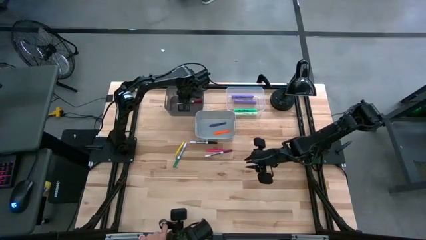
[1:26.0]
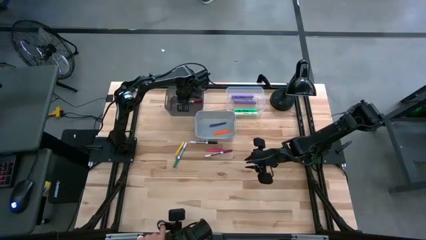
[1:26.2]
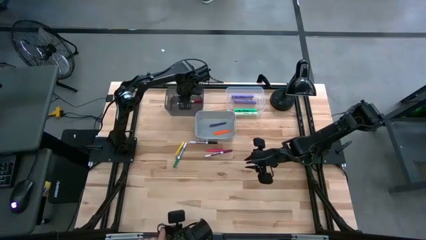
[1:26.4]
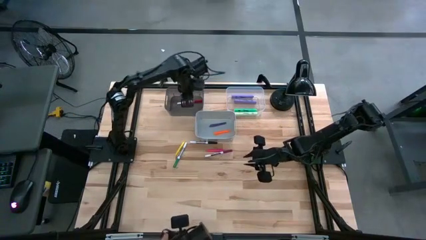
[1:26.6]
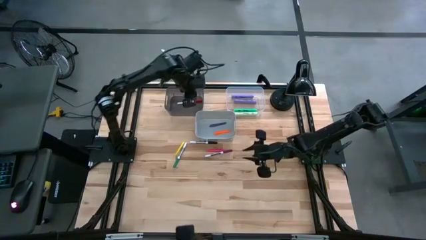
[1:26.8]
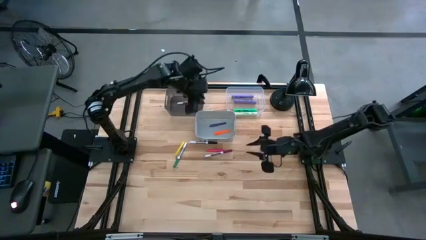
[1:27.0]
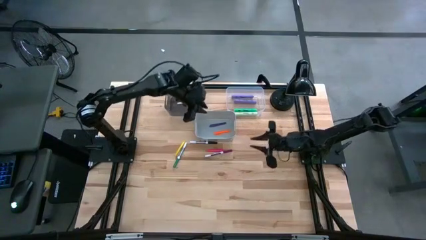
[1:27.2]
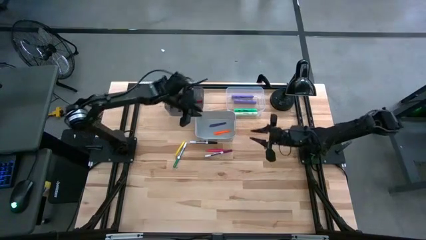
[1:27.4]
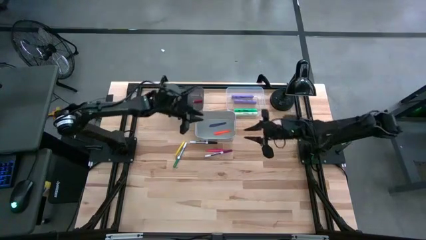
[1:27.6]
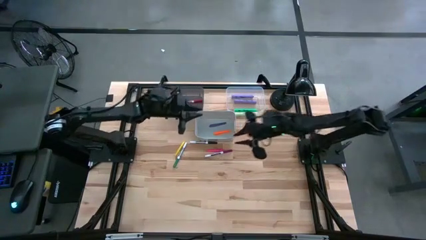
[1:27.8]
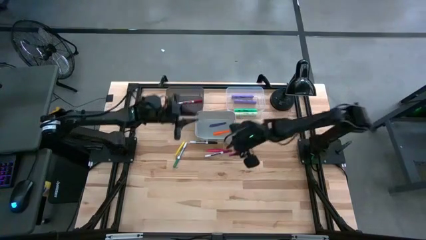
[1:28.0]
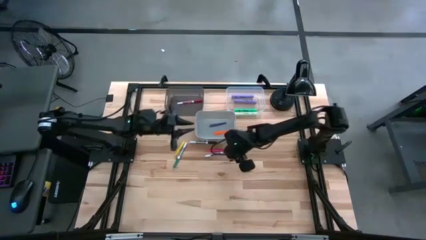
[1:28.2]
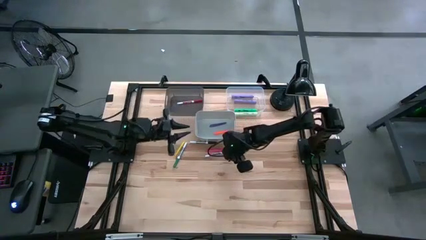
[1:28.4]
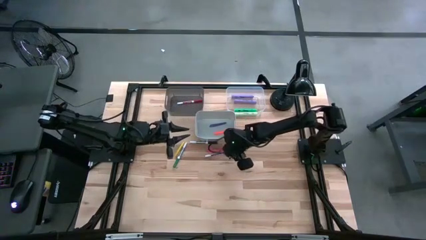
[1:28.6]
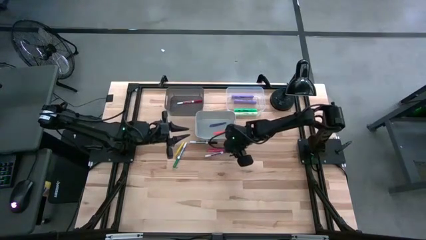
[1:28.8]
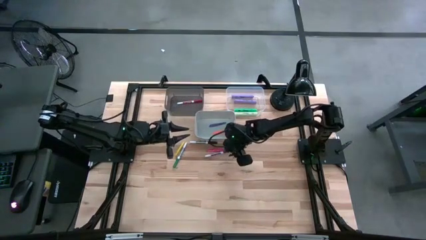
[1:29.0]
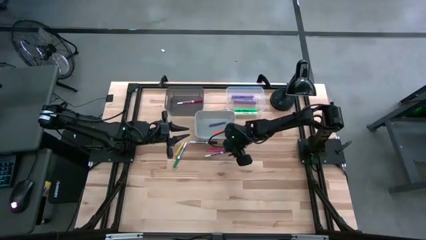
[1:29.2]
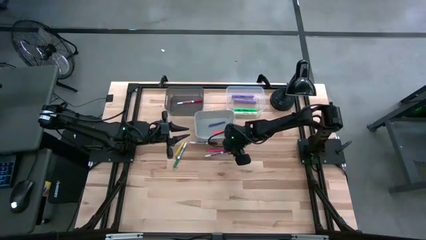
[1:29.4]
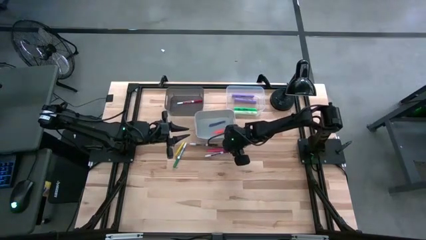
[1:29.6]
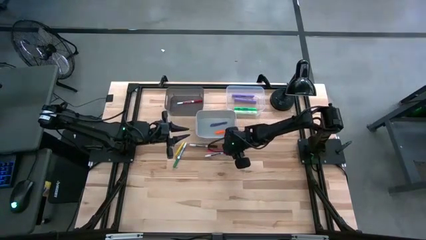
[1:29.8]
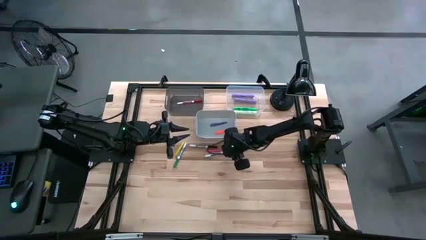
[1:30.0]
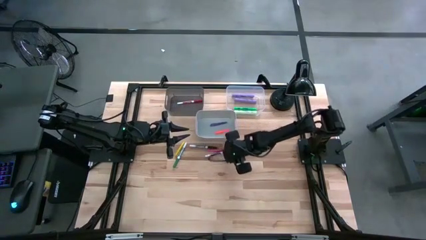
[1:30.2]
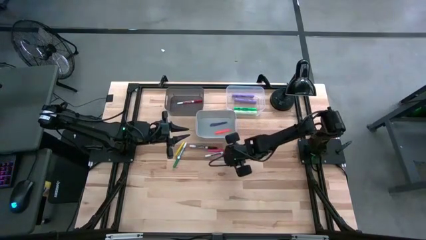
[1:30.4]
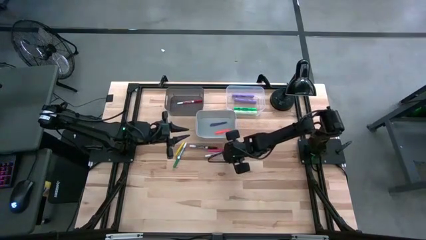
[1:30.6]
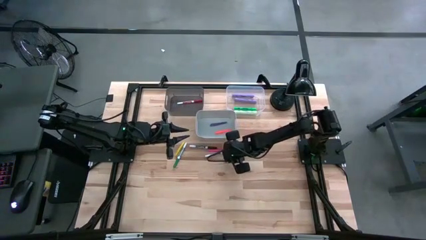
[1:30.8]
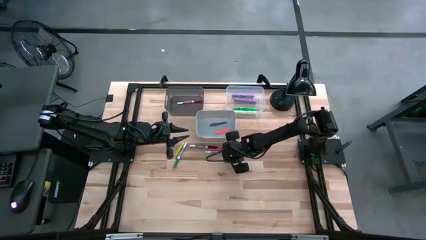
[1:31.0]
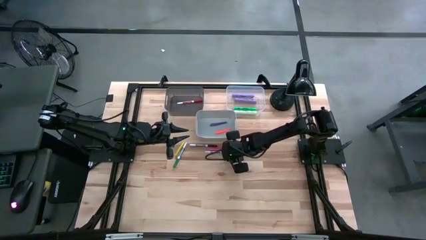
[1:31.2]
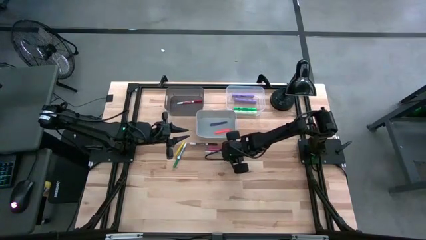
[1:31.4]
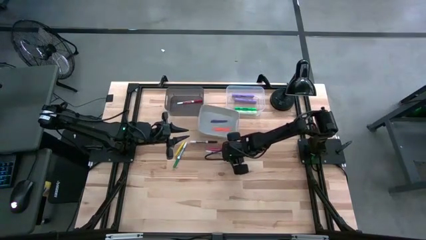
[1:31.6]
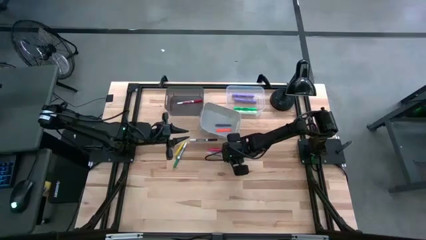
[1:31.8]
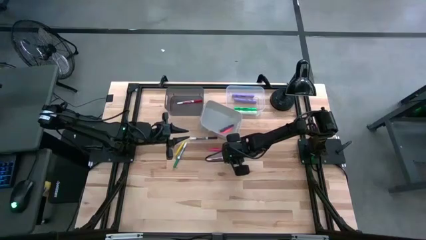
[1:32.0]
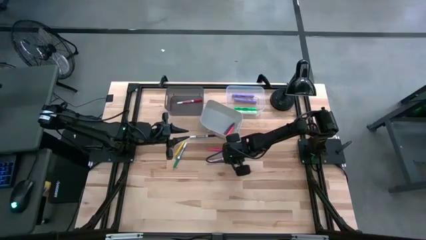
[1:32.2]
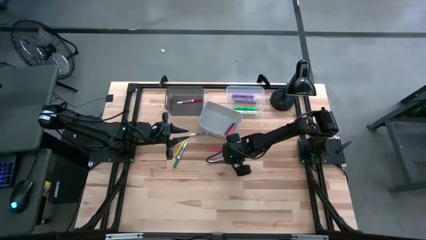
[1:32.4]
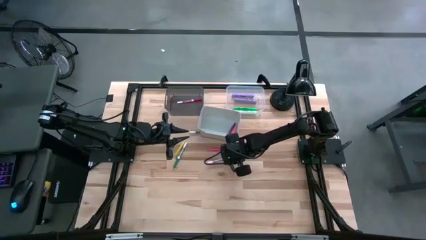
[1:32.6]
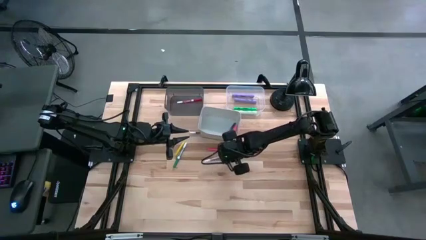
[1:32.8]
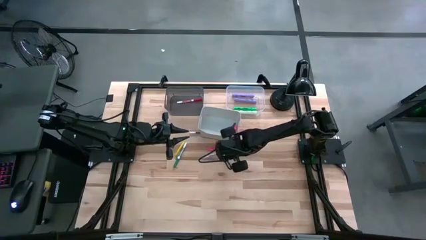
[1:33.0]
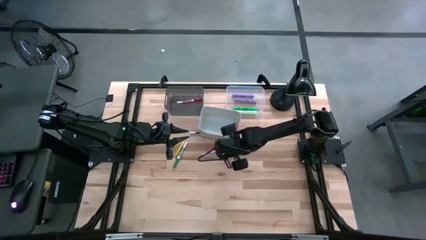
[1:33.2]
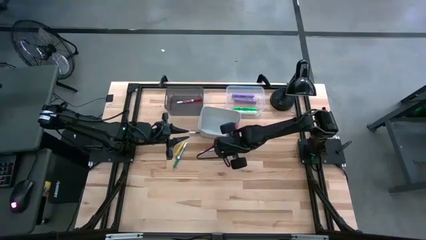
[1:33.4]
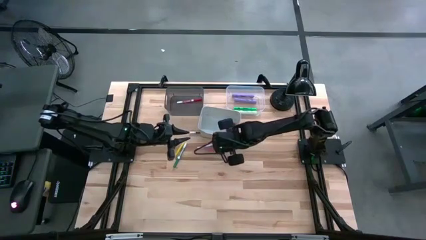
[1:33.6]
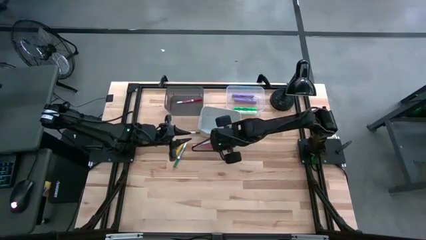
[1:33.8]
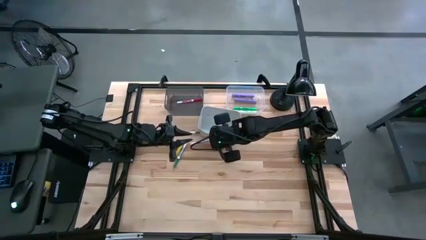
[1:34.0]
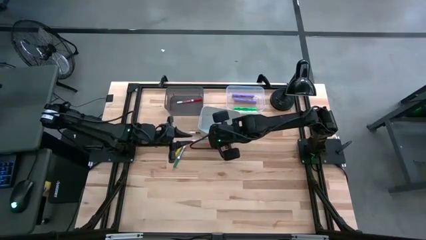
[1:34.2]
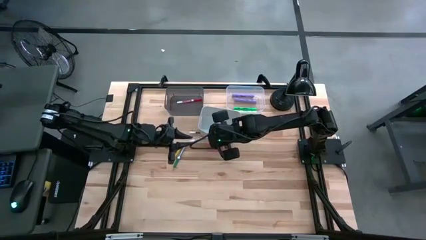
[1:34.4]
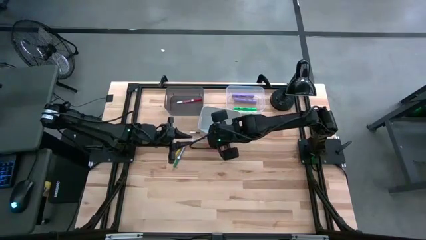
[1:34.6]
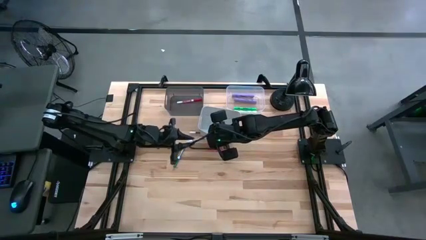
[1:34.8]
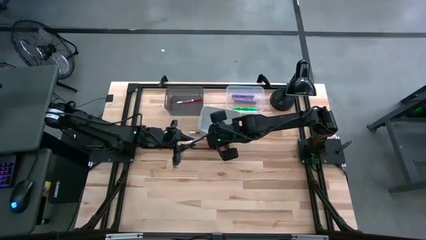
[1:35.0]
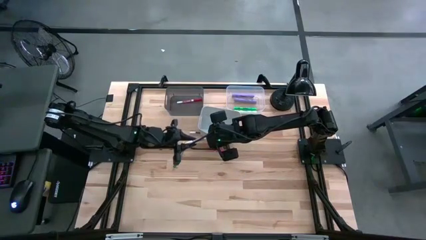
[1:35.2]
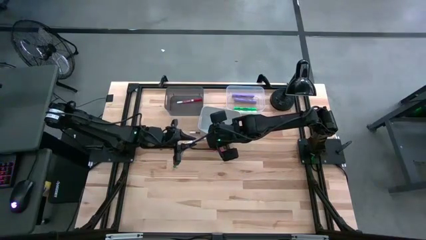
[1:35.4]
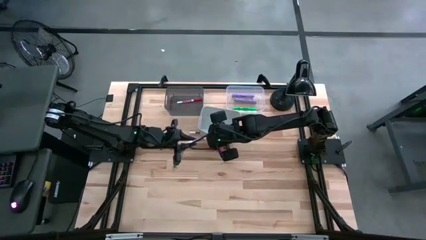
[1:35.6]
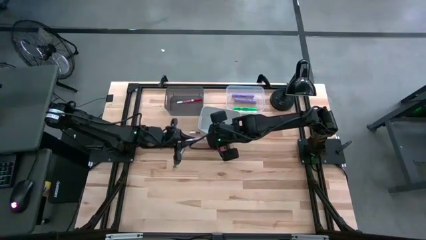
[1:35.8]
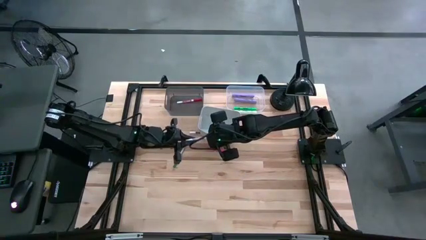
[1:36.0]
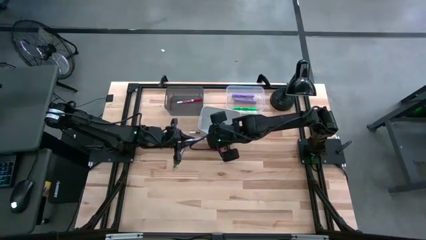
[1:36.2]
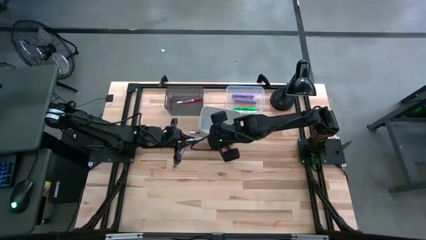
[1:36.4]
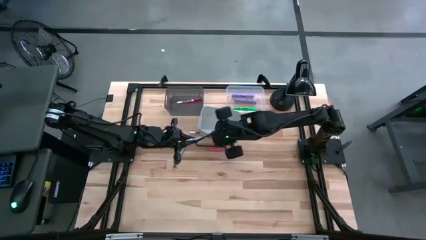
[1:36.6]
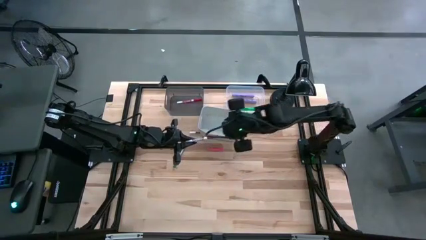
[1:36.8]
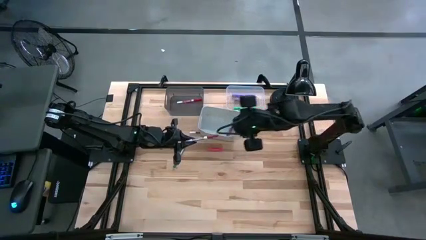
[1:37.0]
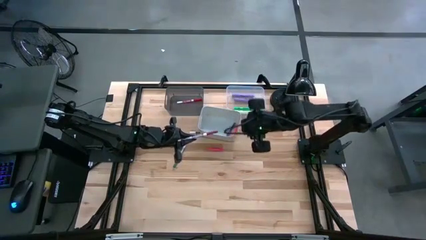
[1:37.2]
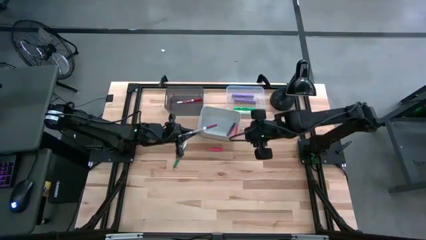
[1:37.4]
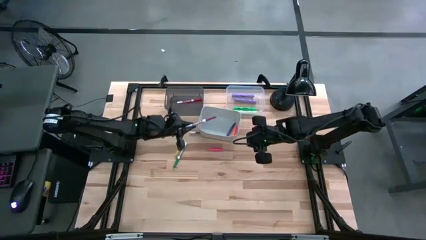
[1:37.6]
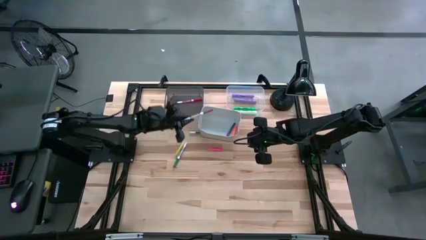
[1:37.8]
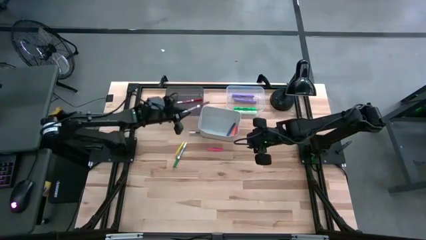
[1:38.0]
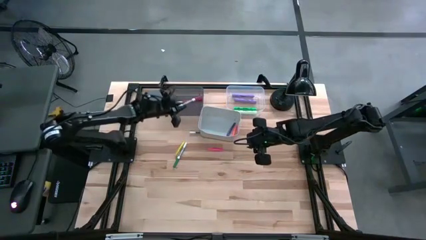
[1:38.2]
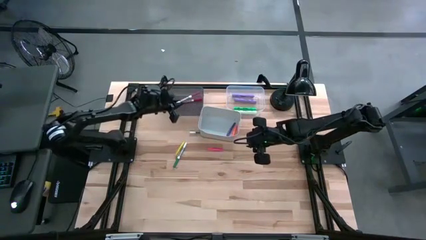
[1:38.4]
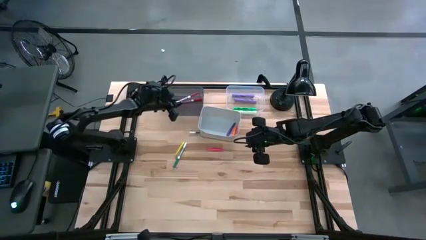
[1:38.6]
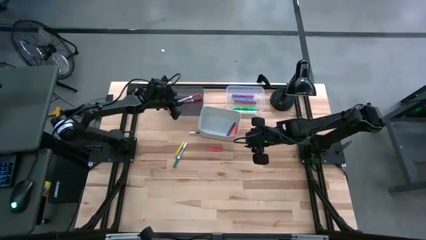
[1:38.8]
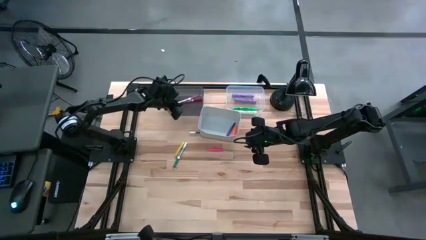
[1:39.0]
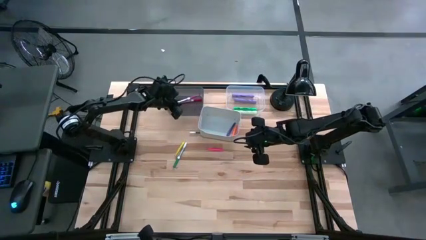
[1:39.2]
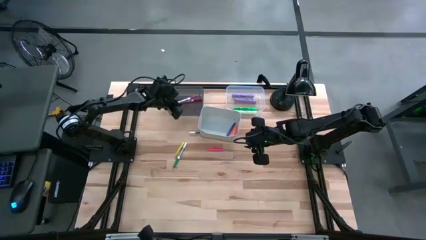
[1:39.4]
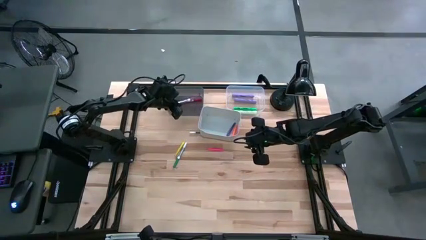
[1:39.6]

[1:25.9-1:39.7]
Task: Pick & Place Markers
Put the dark red marker into the black bin

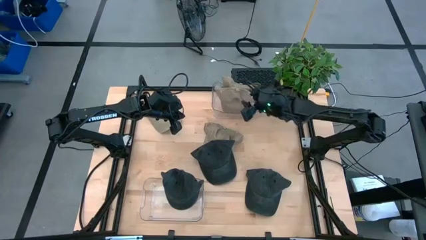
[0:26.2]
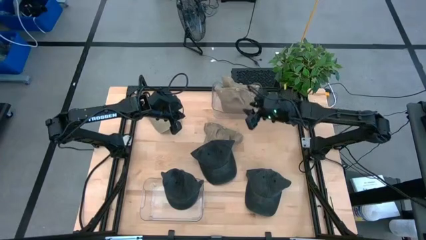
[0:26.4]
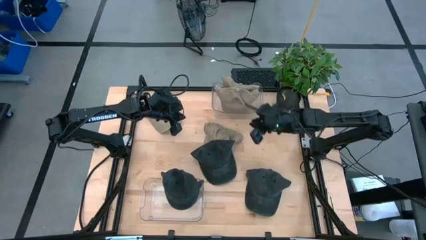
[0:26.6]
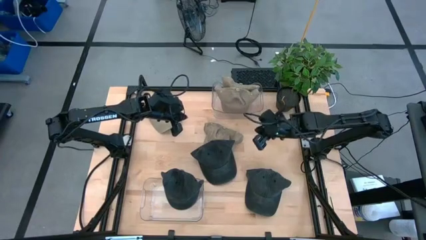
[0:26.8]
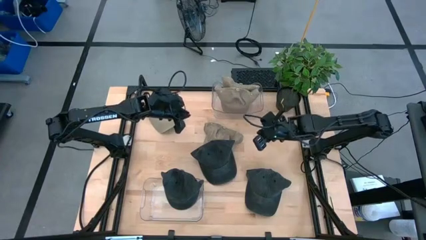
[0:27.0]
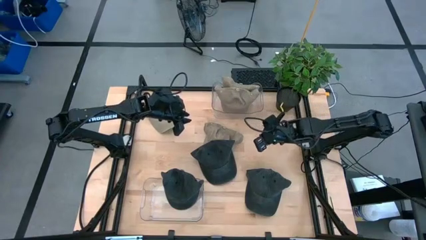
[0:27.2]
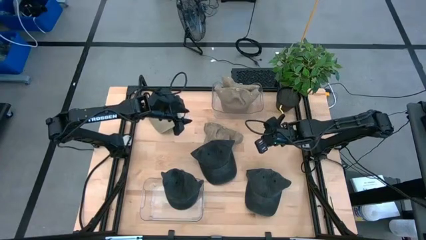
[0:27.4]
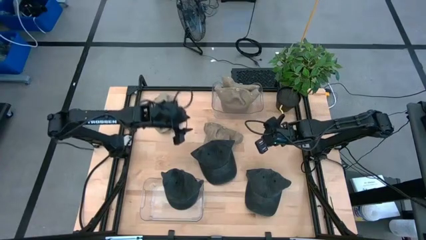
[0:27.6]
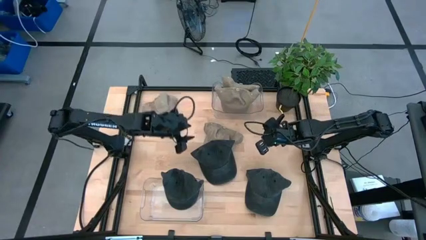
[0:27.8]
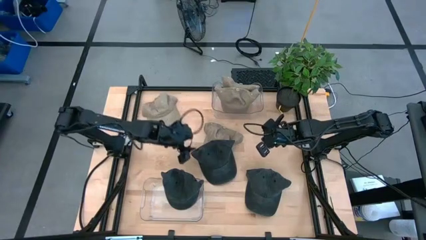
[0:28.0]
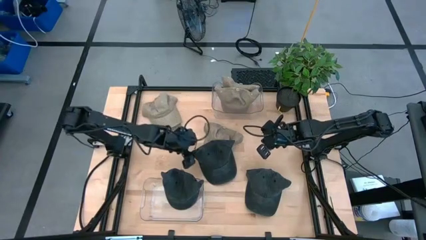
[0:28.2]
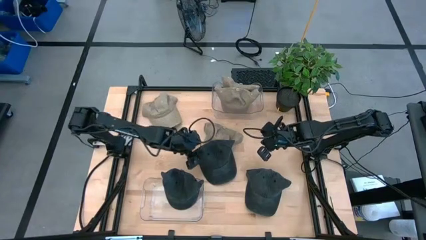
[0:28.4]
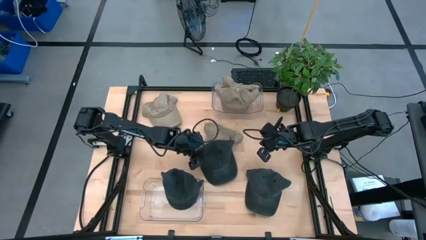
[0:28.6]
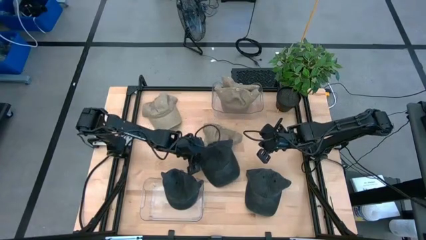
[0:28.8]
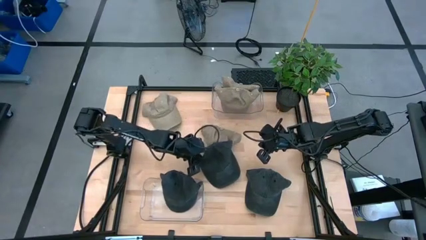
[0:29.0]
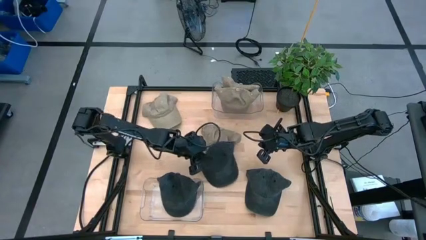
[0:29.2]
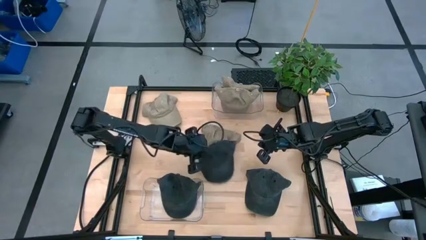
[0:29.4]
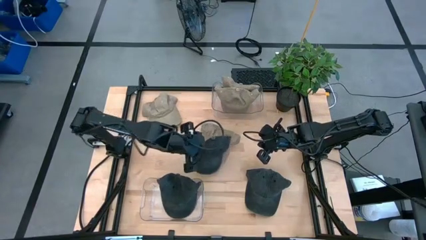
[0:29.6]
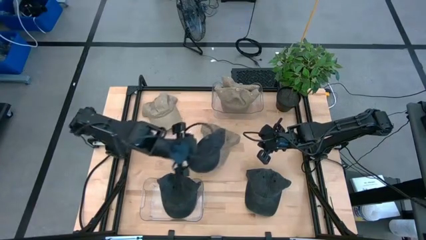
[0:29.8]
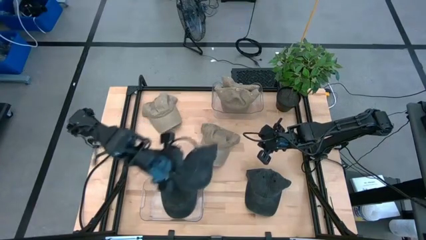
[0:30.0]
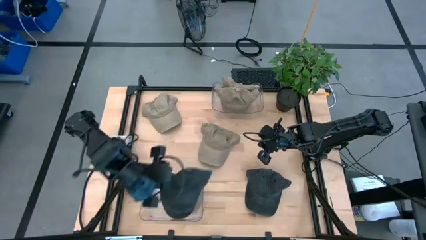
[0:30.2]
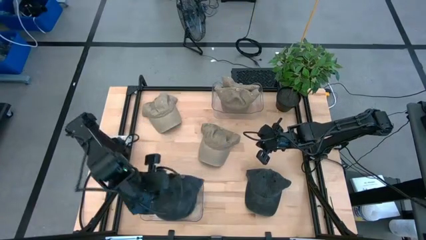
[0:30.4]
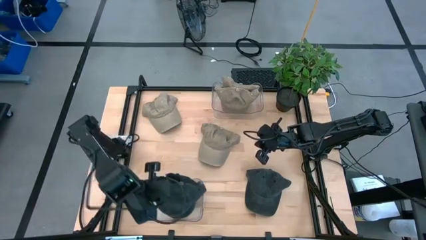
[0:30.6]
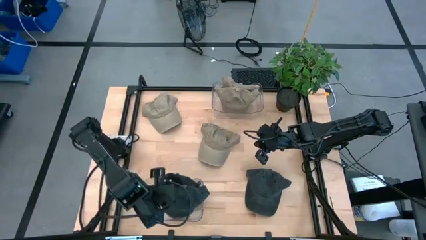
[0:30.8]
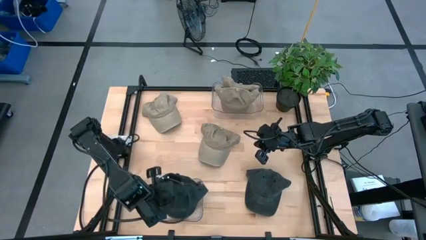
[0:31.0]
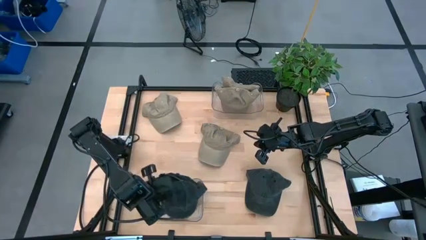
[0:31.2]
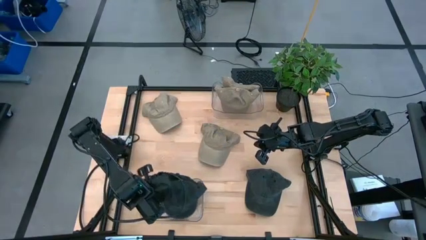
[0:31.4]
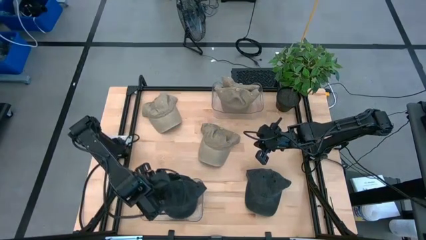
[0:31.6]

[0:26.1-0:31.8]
Task: Pick & Place hat
Put the black cap into the bottom transparent bin
